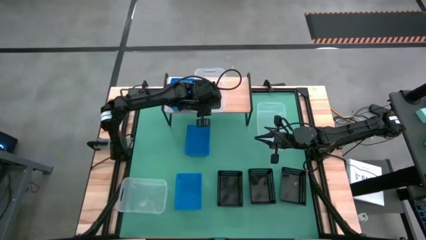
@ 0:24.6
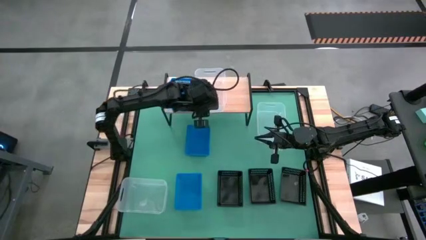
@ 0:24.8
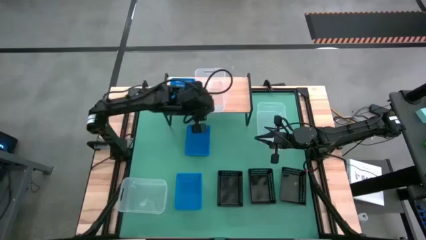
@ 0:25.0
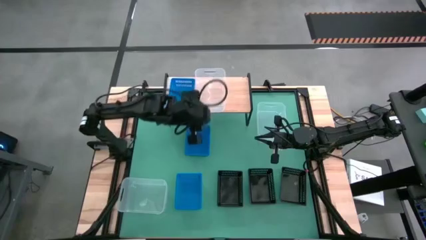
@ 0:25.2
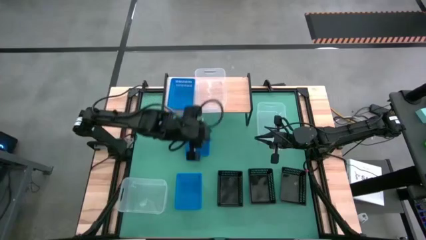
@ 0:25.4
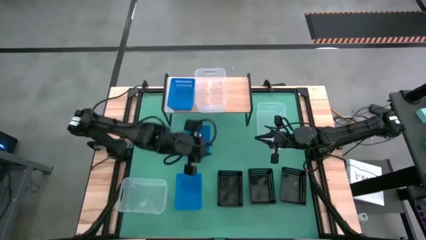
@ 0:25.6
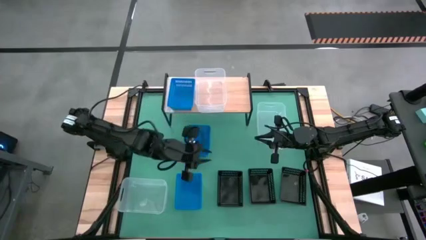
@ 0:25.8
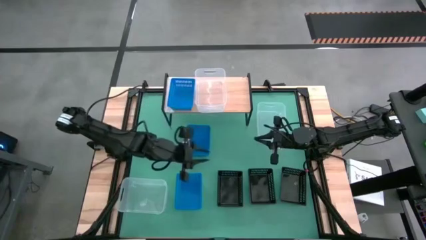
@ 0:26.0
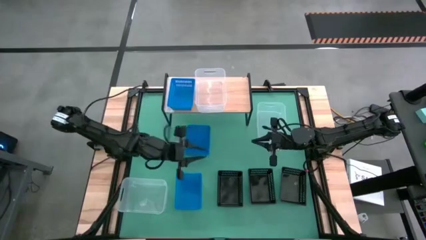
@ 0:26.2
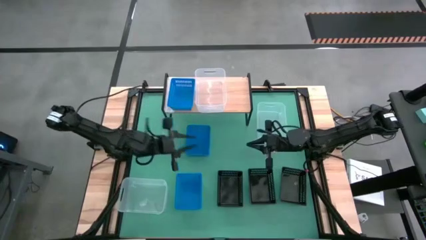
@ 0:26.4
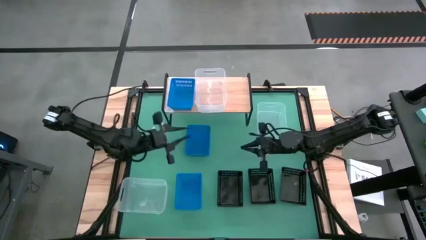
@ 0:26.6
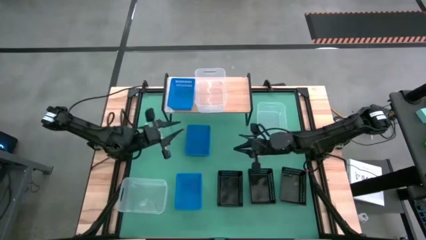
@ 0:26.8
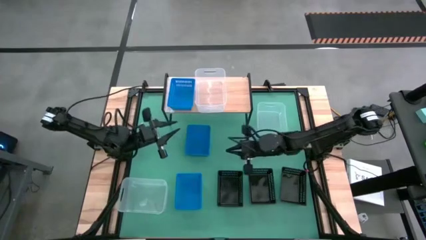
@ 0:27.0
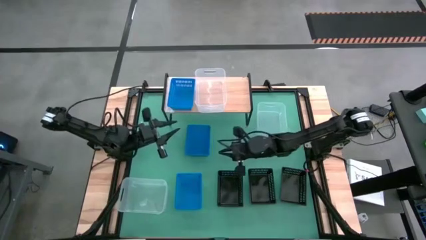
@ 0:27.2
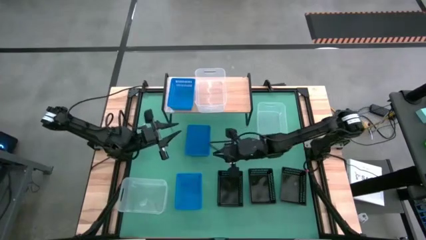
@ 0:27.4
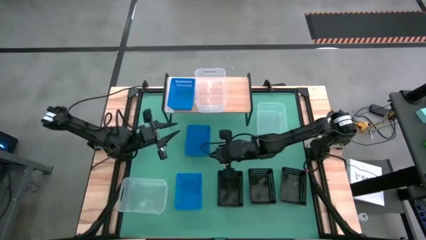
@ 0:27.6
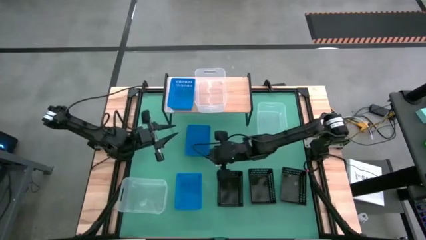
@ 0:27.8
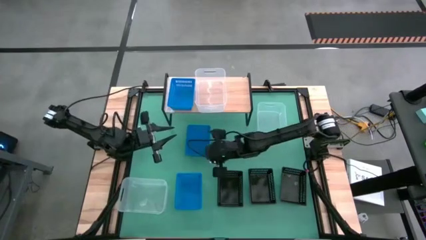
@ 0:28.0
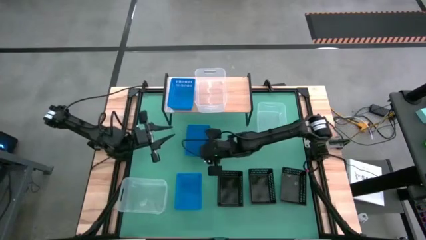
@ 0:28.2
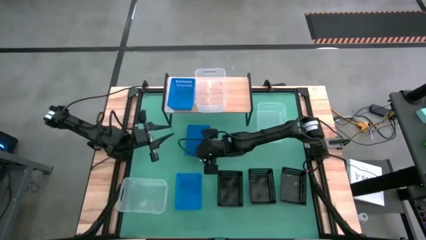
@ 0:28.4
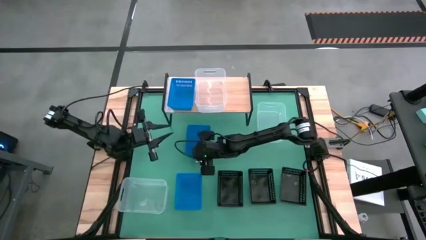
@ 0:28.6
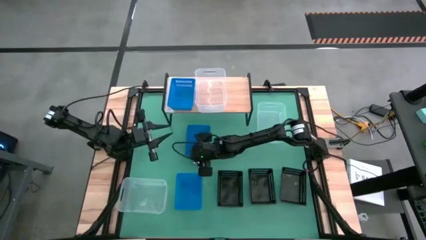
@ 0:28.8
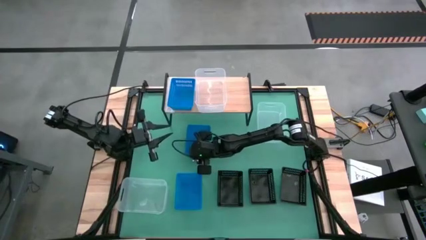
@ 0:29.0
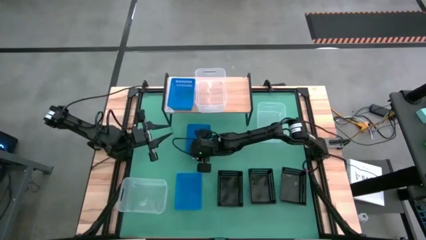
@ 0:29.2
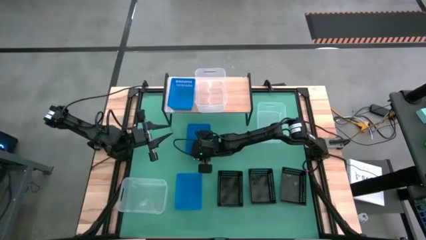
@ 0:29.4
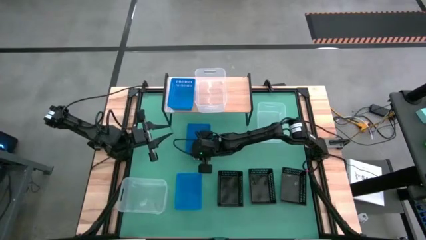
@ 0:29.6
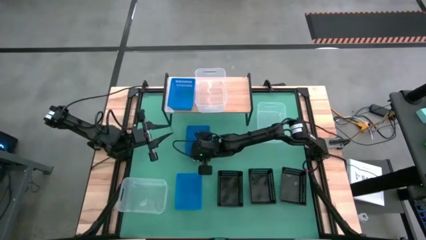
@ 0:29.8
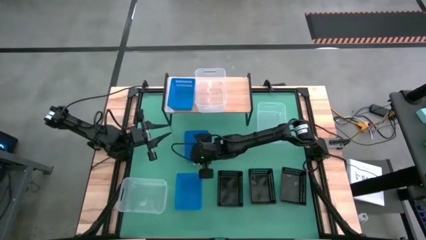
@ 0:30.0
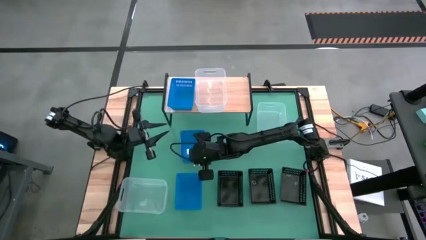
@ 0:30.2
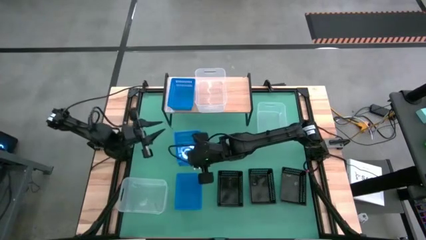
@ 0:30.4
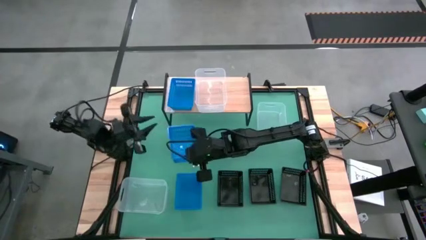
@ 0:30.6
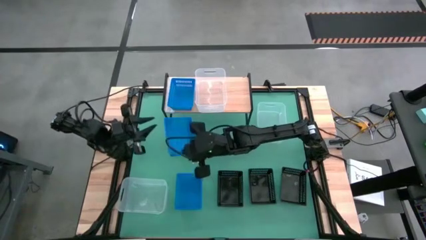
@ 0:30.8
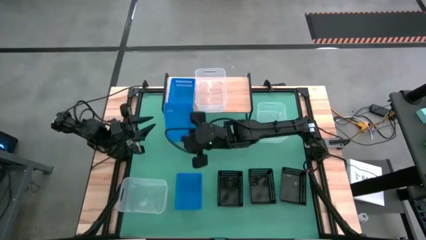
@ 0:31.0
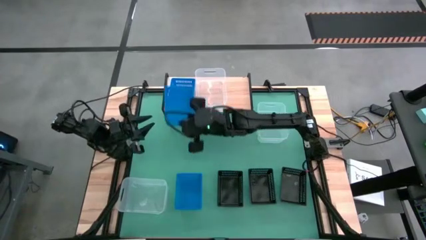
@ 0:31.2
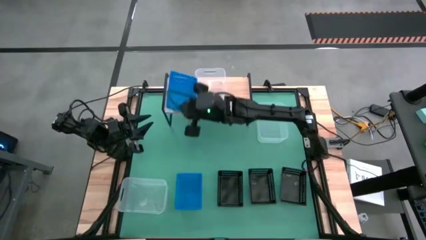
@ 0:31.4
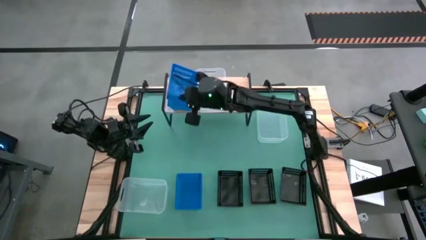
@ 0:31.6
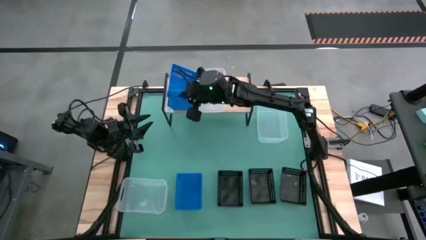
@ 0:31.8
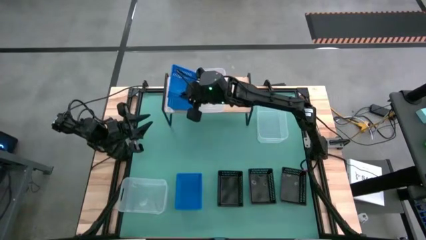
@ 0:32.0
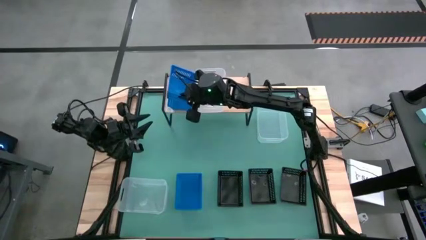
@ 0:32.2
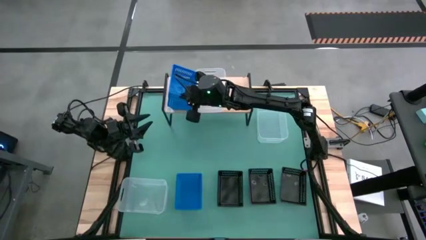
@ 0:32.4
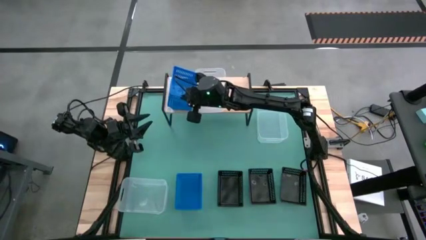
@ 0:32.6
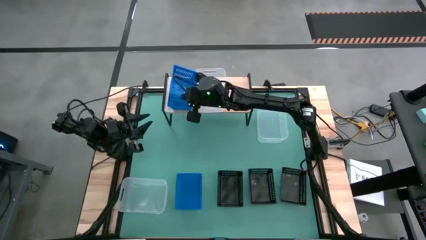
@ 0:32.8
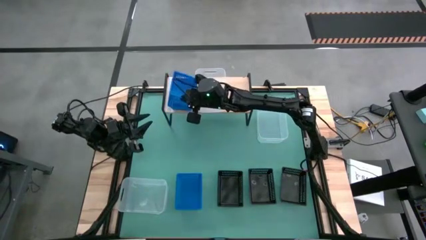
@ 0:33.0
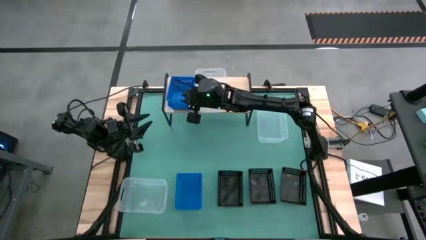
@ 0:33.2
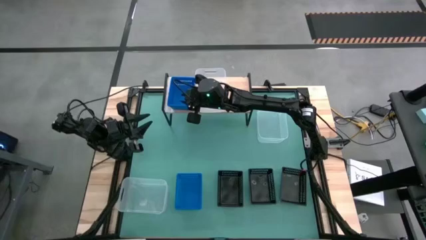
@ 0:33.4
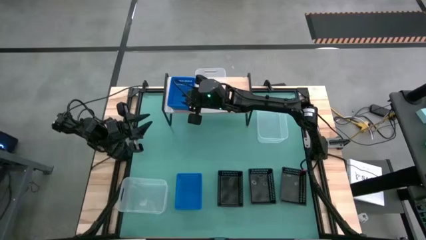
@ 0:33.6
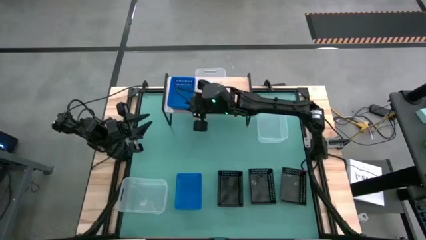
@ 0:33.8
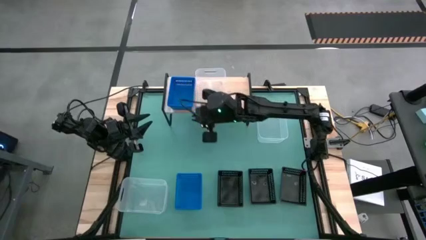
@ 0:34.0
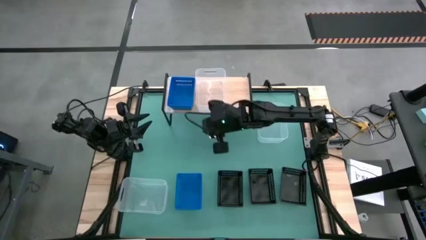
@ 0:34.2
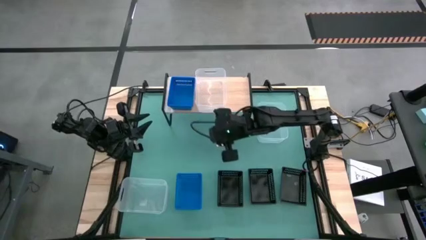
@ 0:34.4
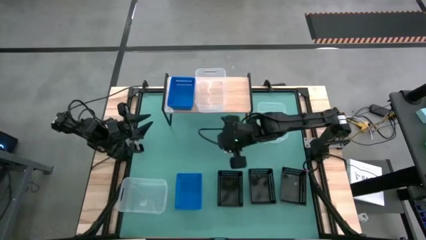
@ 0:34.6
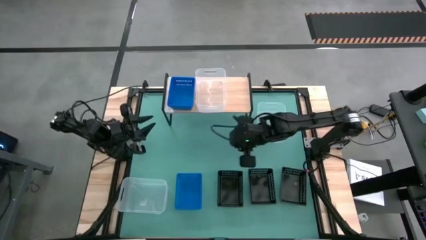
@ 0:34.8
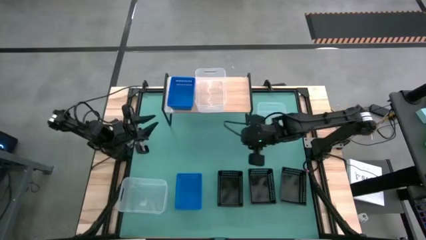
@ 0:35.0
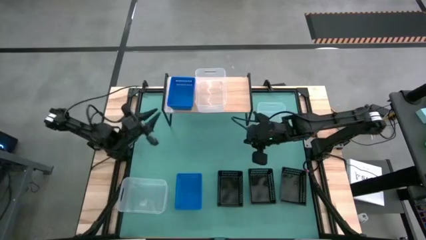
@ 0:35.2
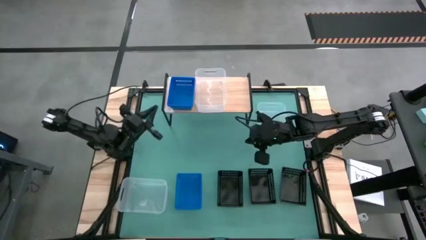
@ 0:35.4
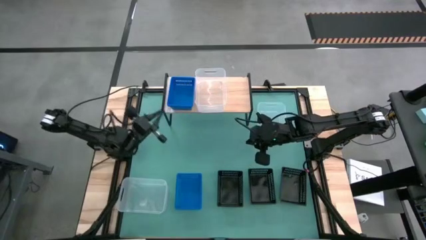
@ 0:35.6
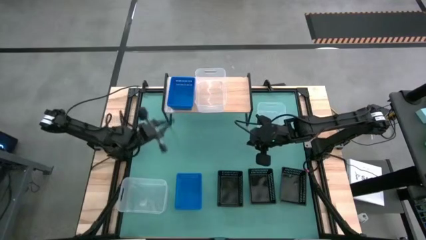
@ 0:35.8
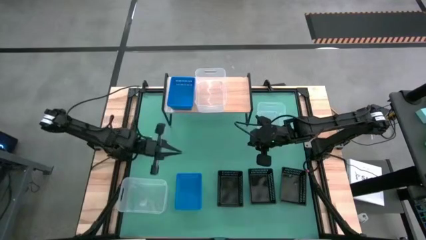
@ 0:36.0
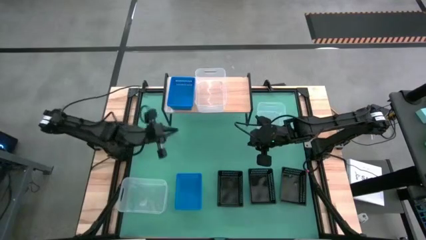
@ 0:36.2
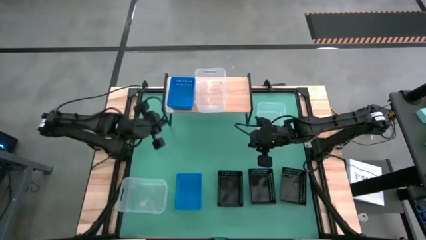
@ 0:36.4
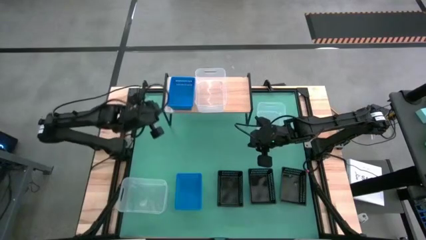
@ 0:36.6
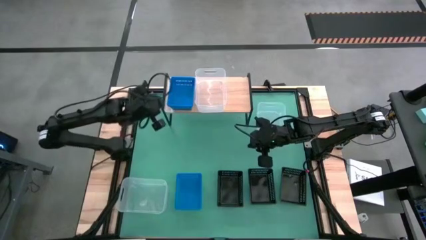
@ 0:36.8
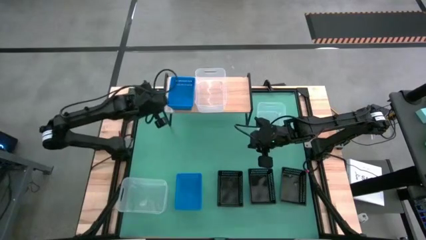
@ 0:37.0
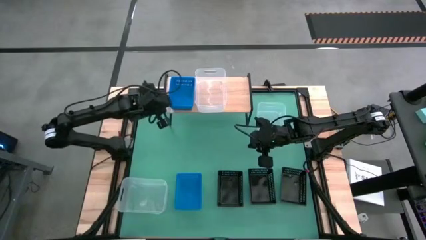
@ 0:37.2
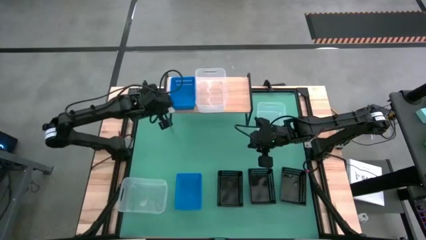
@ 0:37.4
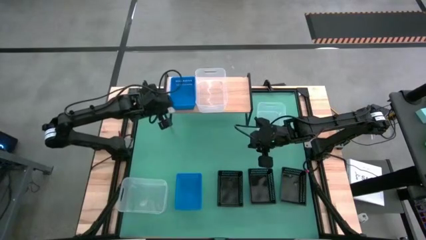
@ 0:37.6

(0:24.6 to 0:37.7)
Task: Stack baskets on shelf by color
Stack the top blue bin on the blue bin on the shelf

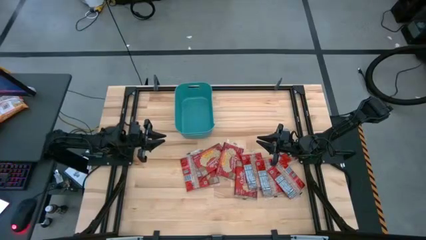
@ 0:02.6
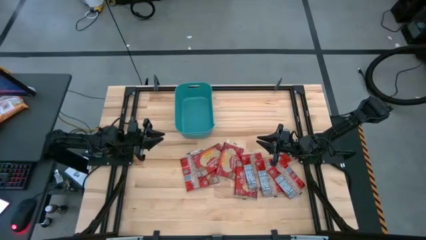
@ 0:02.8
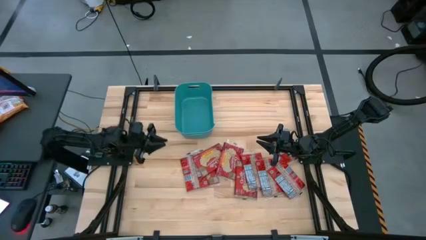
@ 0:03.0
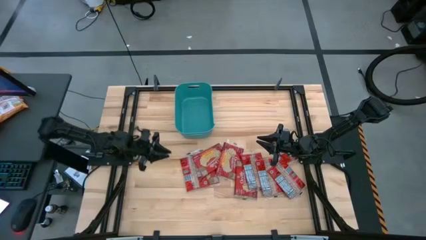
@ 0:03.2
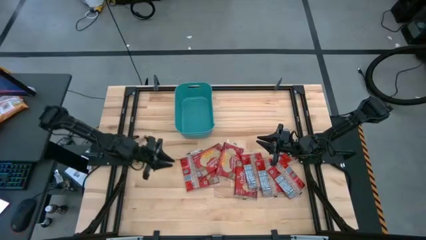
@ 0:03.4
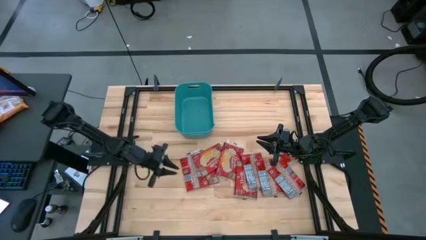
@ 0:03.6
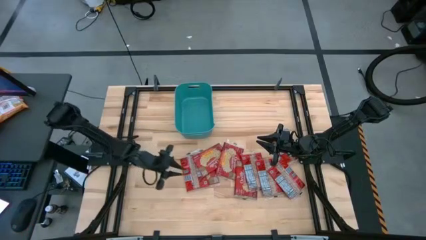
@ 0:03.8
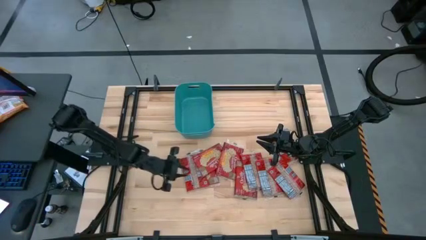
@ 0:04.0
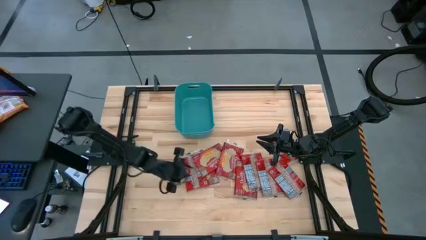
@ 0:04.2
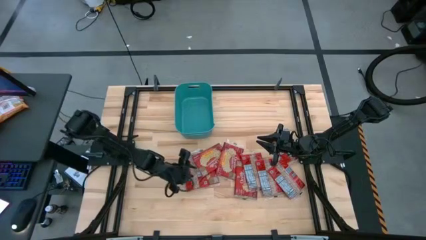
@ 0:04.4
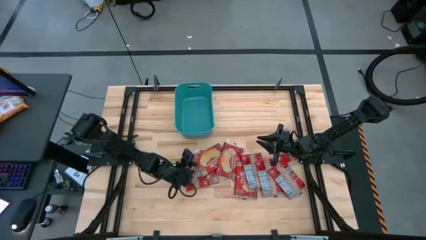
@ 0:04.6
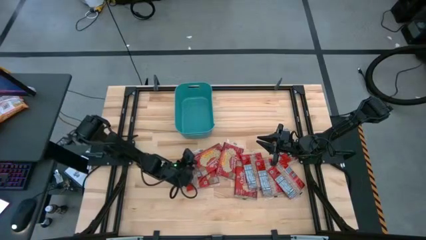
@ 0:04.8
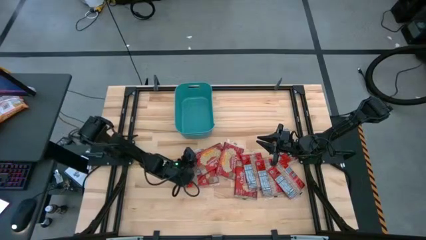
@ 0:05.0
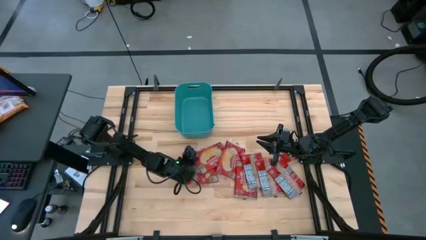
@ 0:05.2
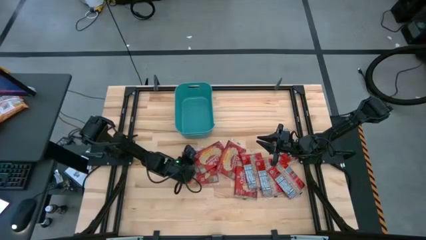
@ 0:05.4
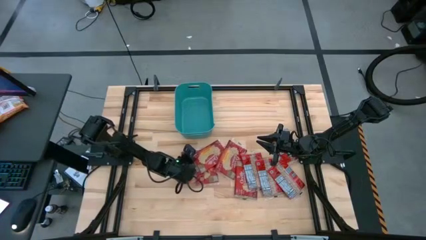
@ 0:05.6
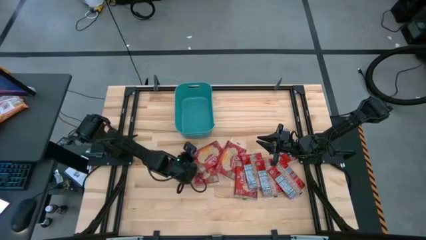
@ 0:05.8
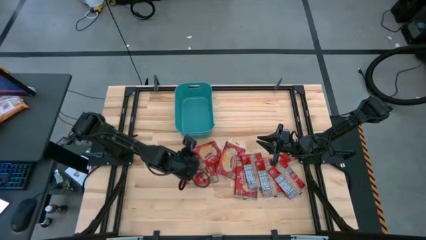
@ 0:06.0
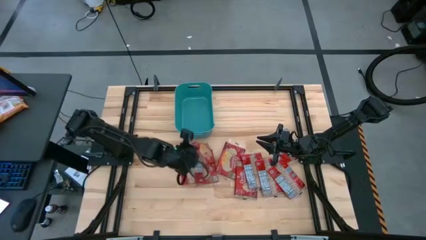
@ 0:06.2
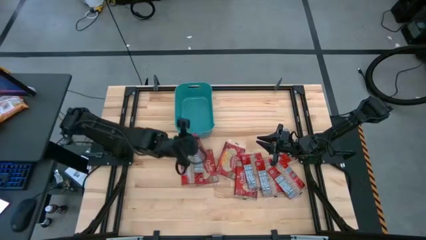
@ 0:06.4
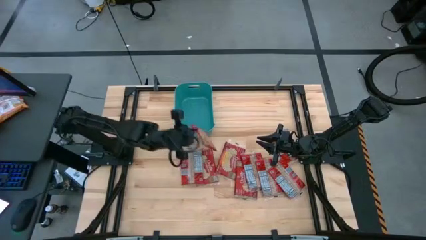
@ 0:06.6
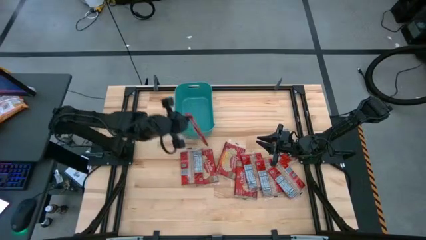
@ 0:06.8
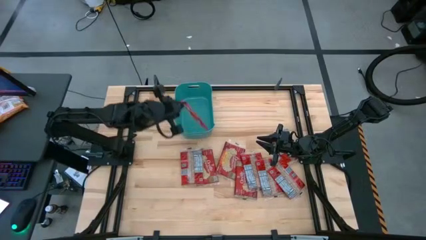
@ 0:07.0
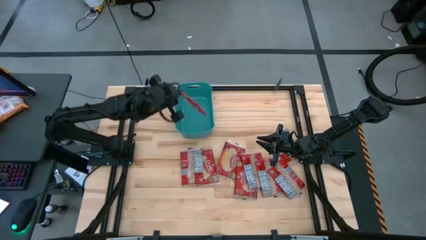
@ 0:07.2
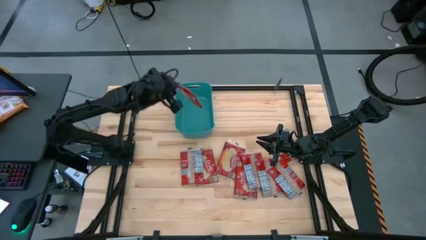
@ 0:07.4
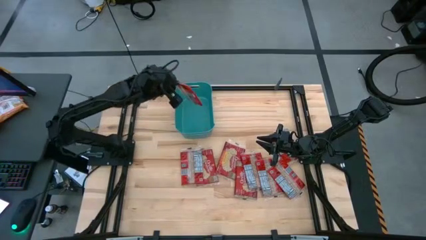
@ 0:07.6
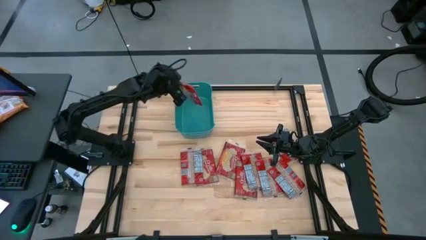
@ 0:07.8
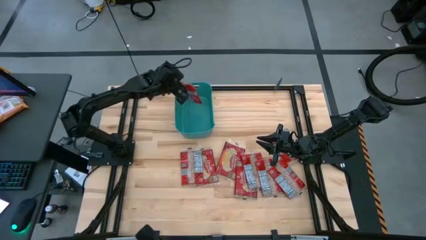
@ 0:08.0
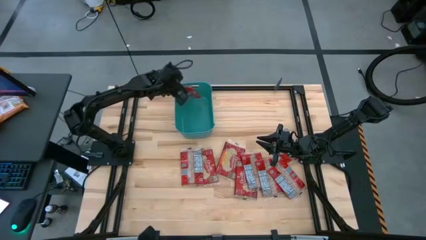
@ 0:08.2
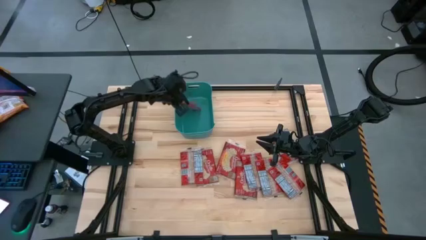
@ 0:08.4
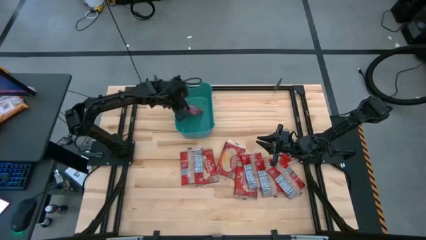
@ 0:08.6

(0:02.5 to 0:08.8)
Task: Sort popcorn bags into baskets
Put the red popcorn bag into the green bin
